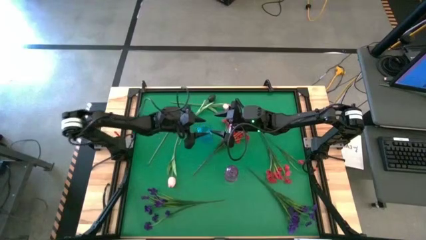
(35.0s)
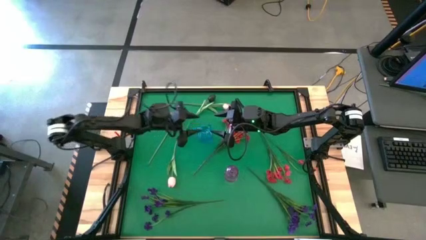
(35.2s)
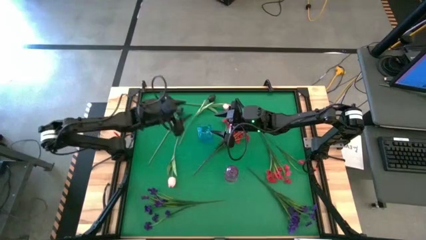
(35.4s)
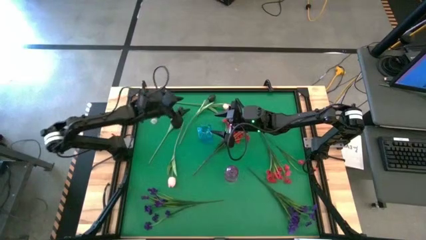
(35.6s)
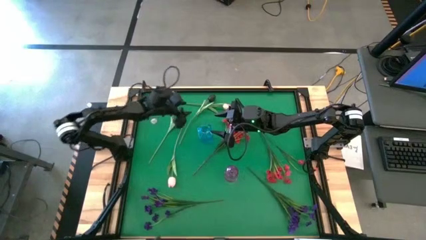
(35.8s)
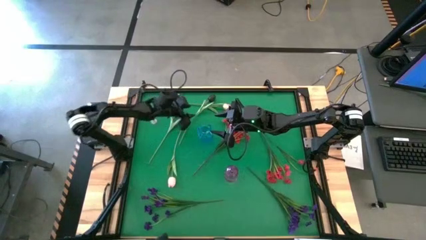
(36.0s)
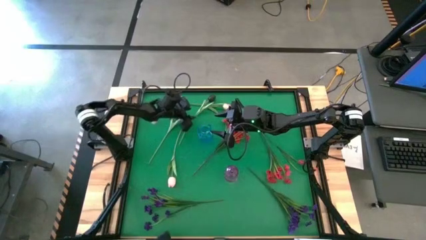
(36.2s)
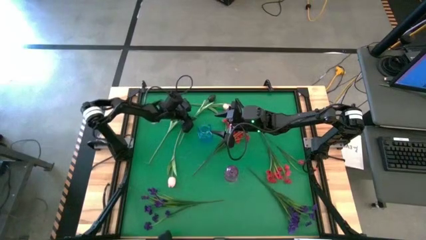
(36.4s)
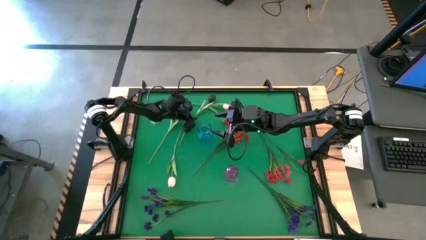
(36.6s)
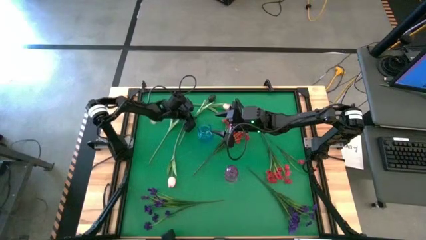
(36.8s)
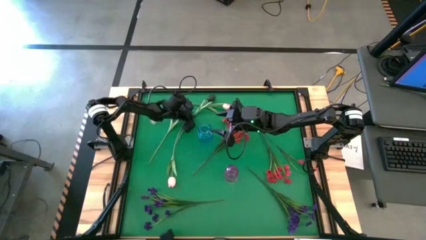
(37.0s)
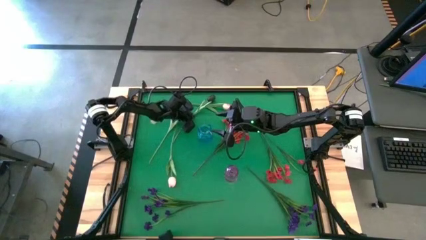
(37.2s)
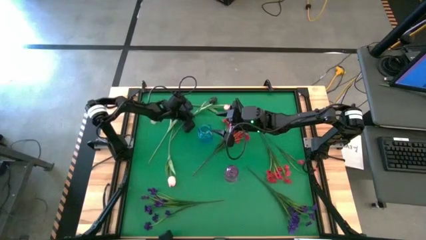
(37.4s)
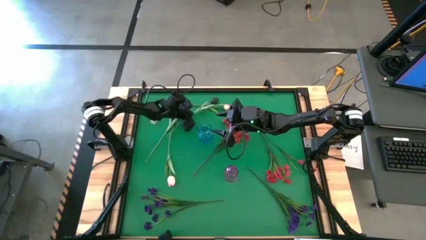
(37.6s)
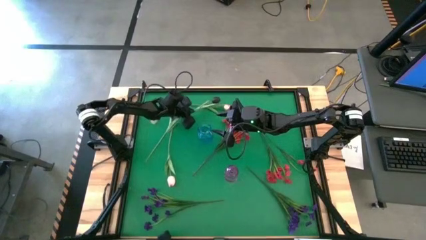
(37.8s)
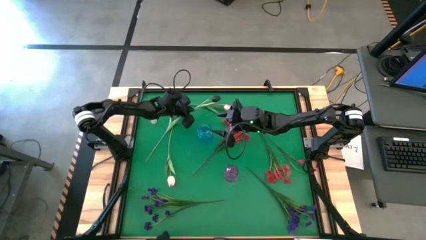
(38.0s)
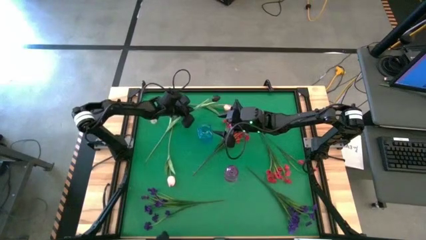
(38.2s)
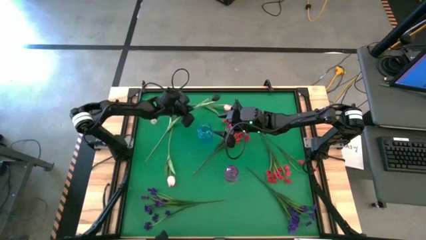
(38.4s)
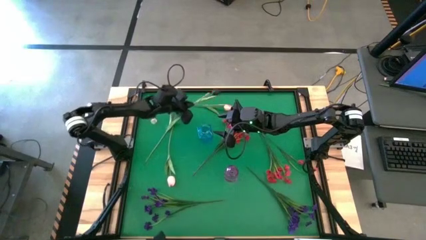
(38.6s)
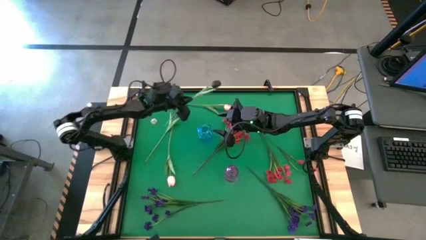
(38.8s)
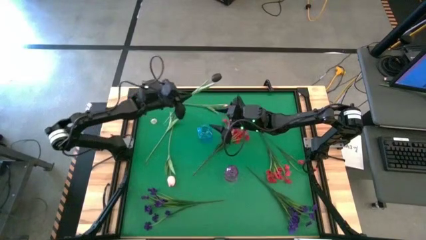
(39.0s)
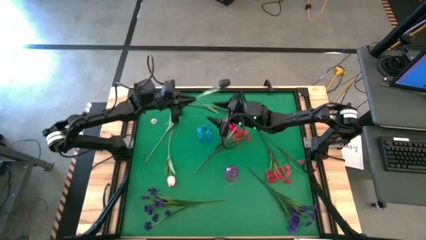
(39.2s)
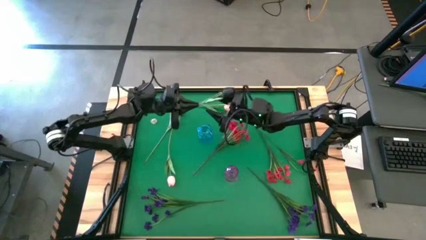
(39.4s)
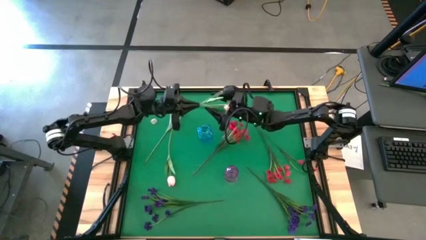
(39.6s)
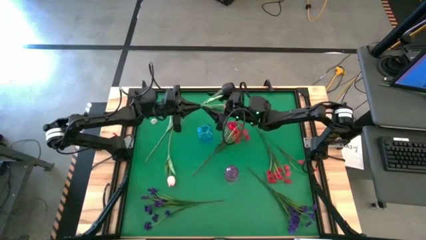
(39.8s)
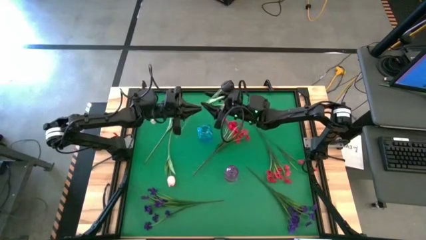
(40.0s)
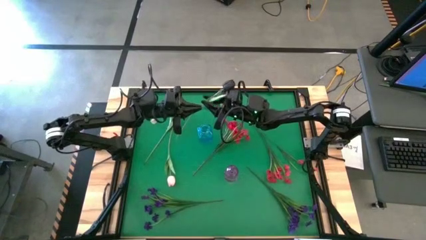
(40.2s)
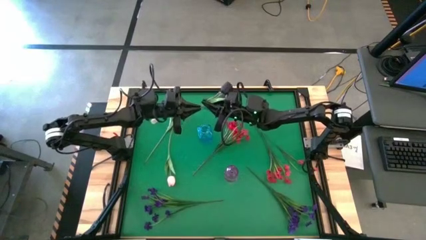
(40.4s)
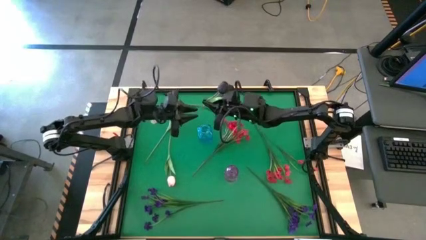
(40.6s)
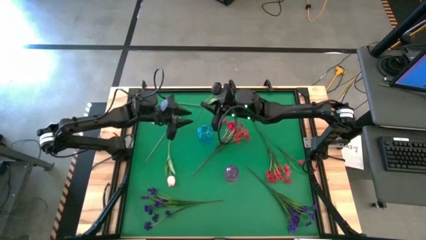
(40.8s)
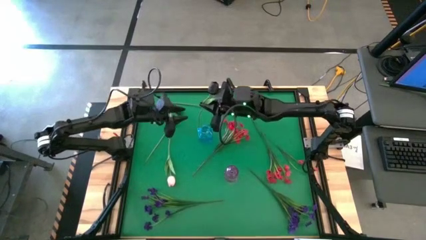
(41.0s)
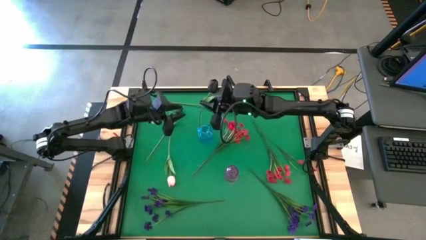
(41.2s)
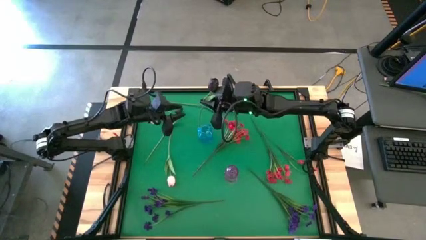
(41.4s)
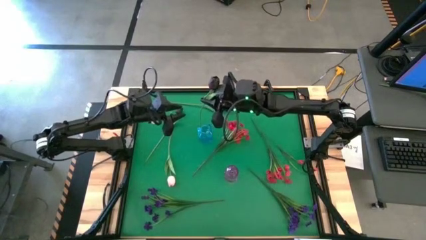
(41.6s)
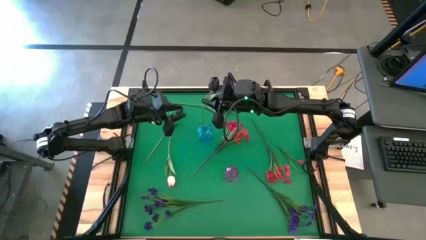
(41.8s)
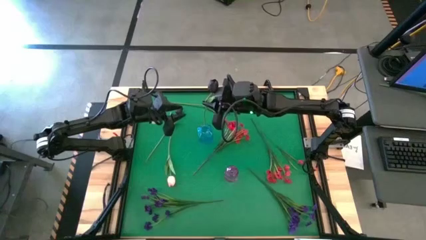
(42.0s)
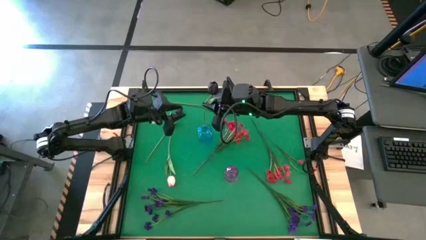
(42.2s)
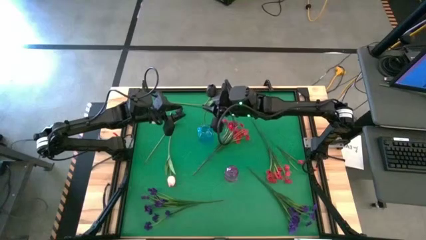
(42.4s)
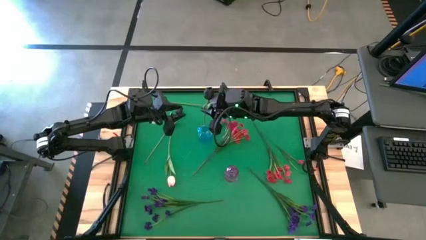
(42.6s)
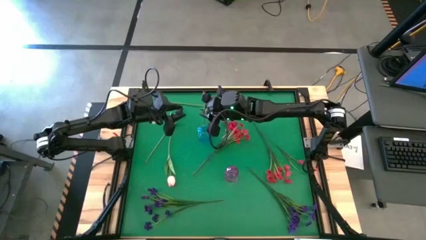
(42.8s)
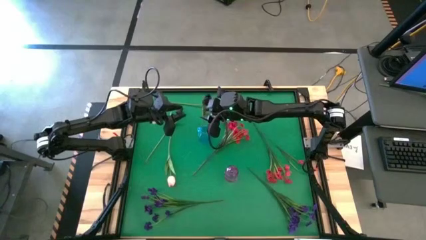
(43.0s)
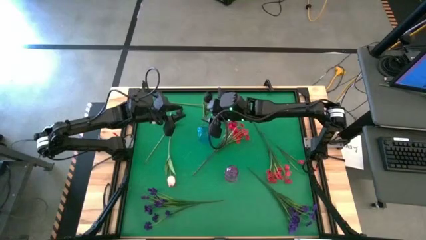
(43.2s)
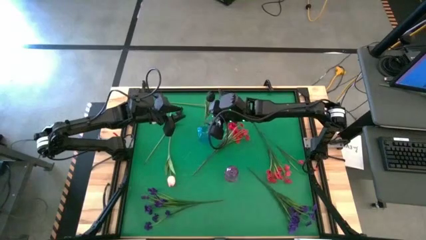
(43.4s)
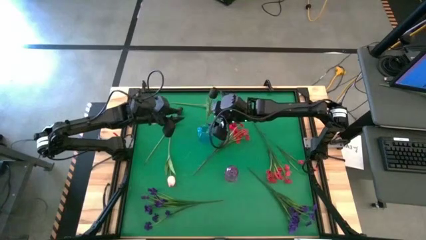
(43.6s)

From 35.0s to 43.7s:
Task: Sort flowers into vase by color
Put the right black tulip into the blue vase

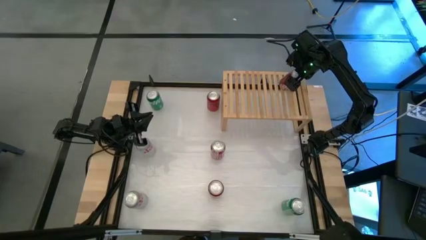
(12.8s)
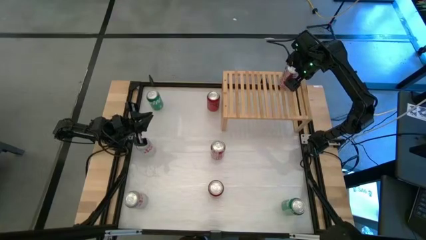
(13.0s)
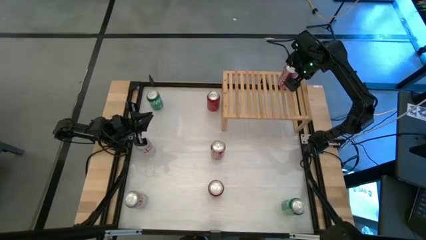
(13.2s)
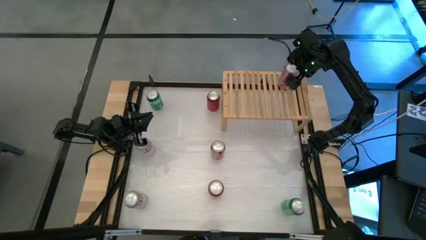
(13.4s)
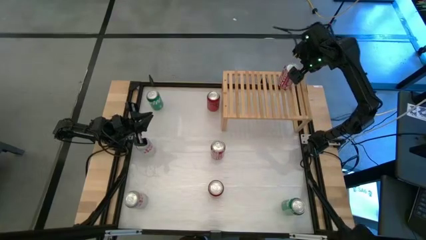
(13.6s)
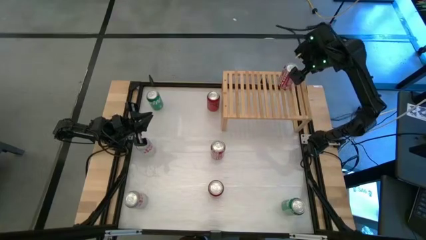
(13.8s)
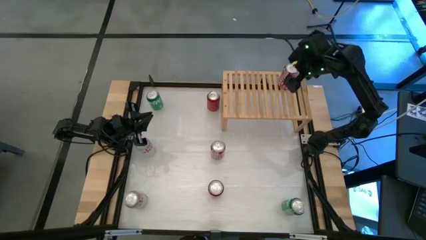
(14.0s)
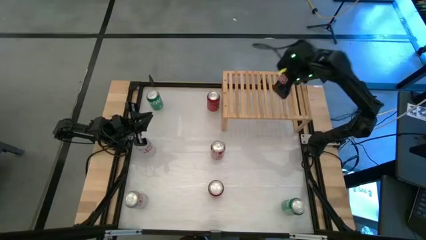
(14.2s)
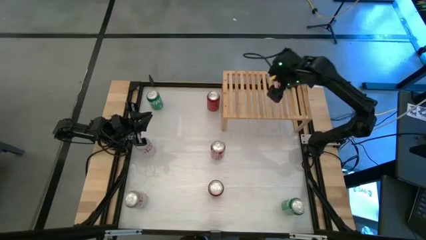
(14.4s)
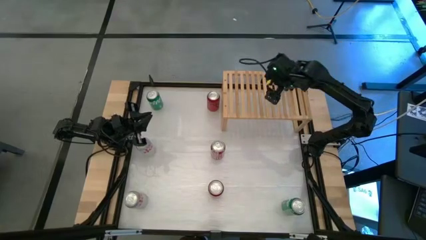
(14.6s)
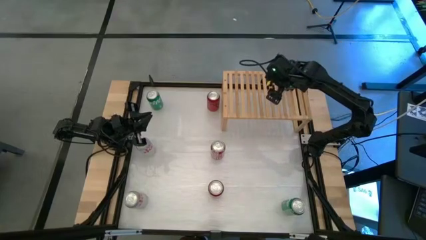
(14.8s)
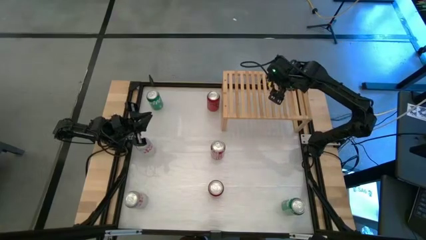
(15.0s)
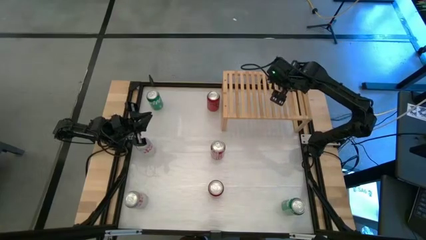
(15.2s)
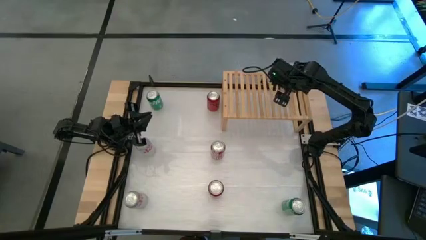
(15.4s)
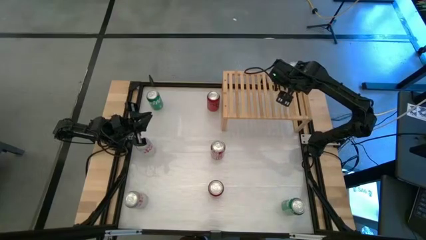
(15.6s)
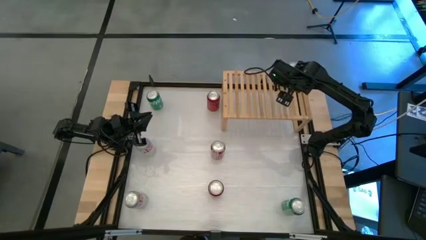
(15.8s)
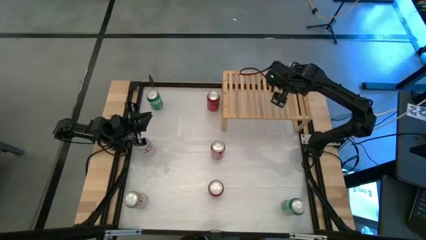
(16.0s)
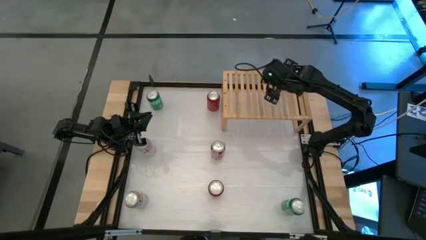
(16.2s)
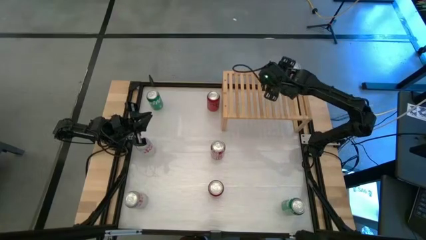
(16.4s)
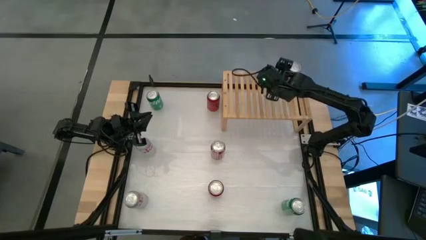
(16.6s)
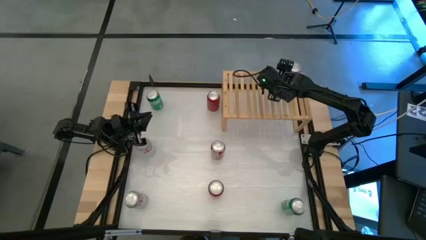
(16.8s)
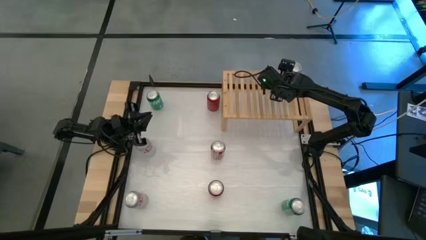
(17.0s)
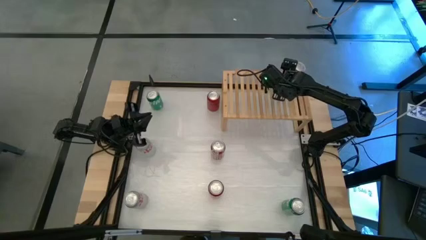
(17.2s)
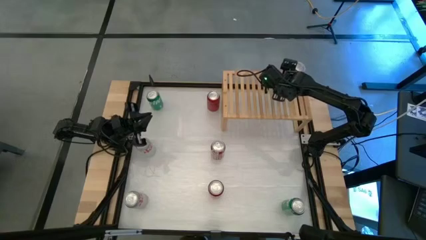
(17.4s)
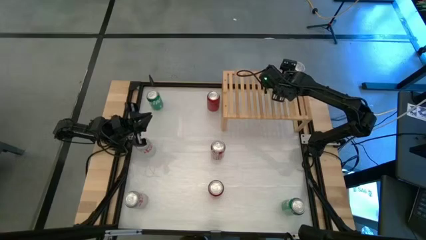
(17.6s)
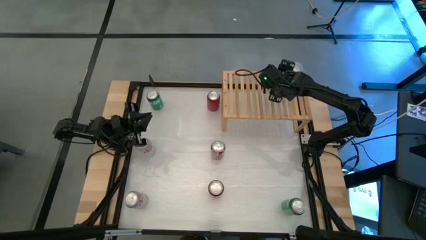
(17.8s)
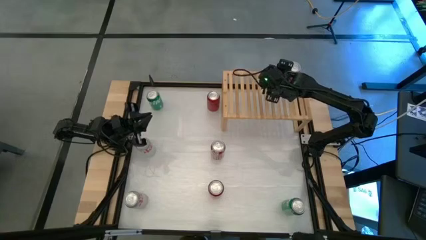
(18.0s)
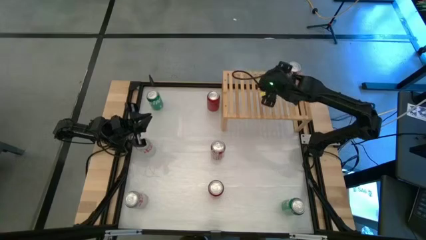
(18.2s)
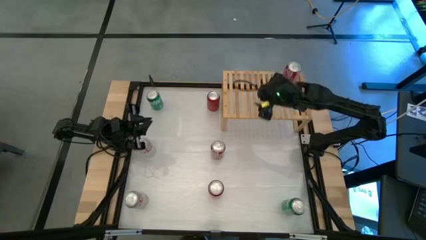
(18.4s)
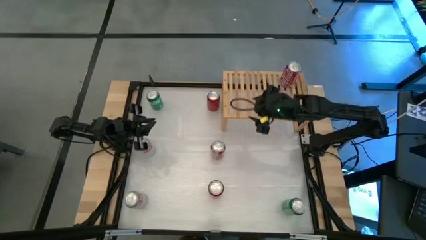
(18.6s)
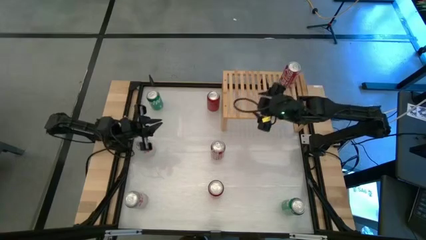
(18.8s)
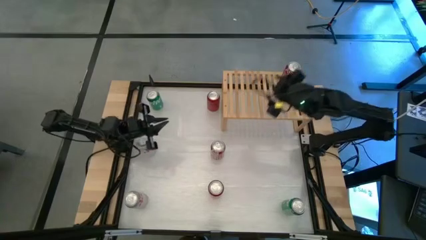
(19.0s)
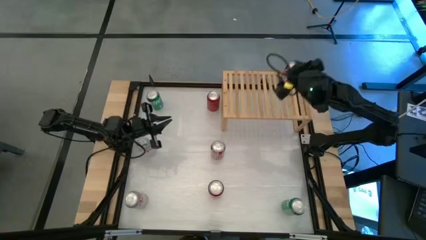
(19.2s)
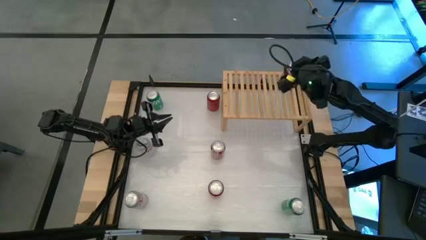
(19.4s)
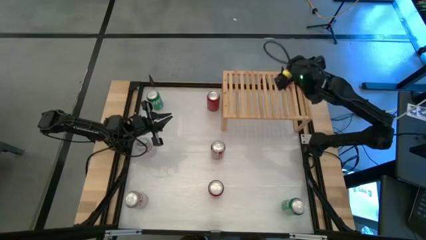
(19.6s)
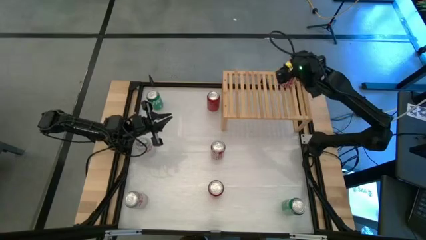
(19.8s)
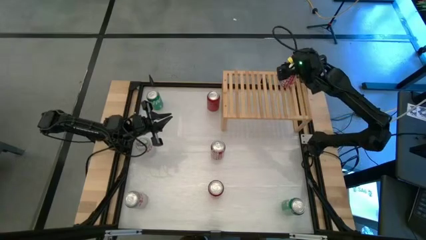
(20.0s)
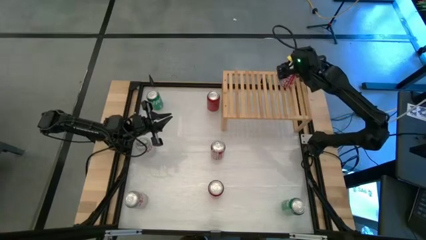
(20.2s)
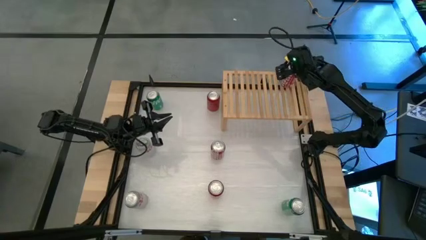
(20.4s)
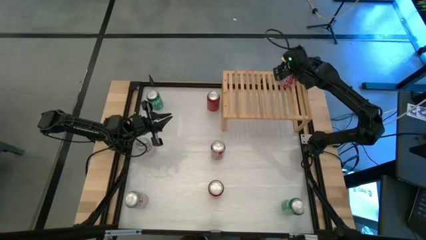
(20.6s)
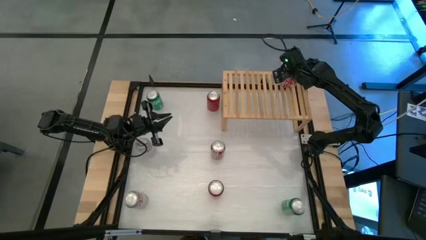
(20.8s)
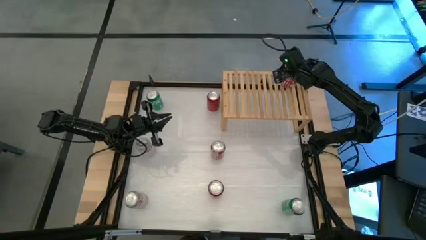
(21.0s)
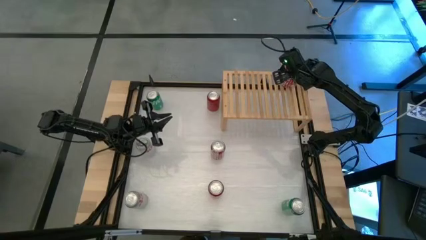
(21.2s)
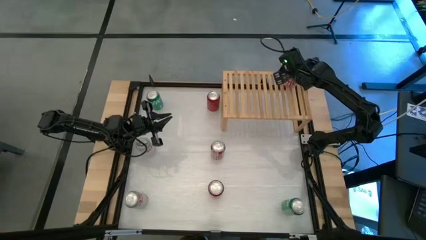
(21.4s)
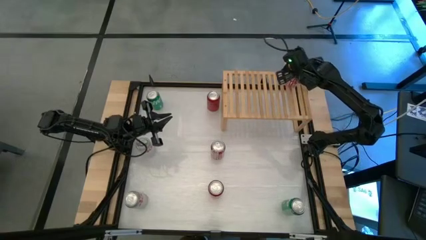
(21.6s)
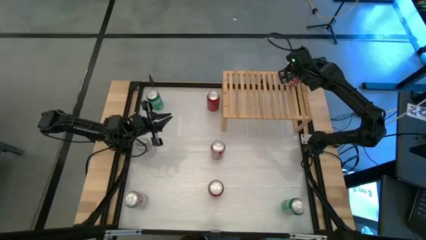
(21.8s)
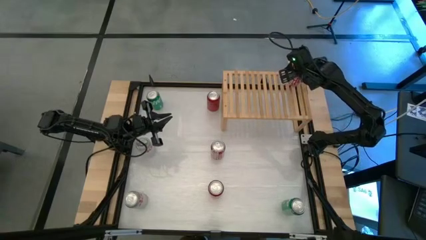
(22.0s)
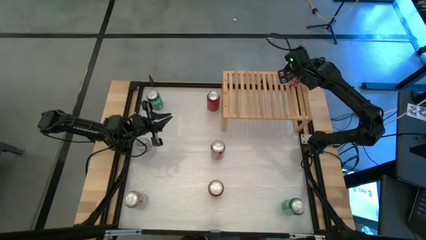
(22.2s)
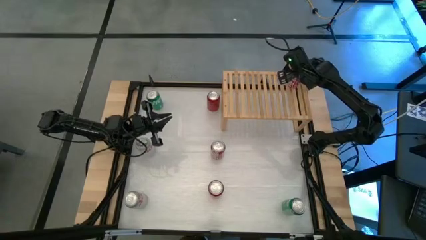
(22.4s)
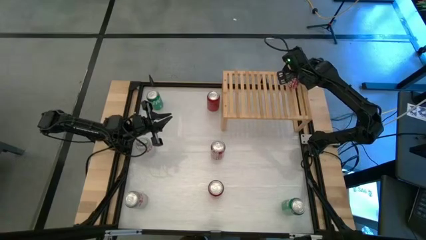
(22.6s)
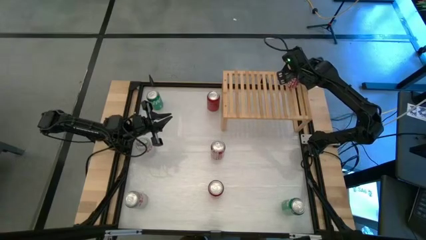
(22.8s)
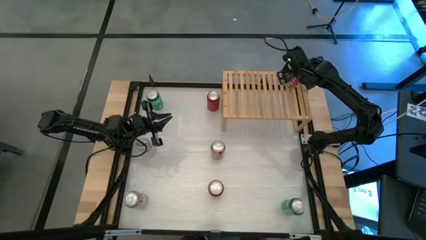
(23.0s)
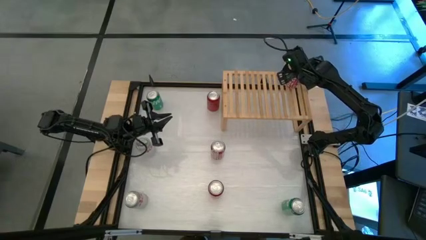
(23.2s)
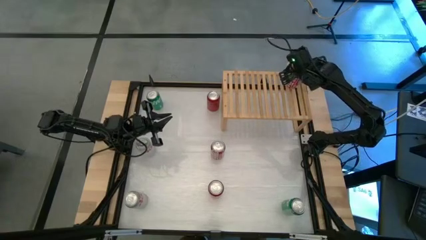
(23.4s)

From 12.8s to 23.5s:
Task: Place canned beverage on shelf
Put the right red white soda can on the shelf
